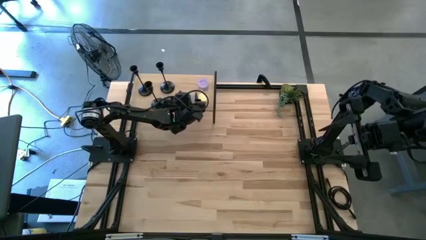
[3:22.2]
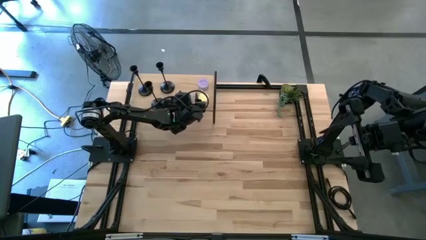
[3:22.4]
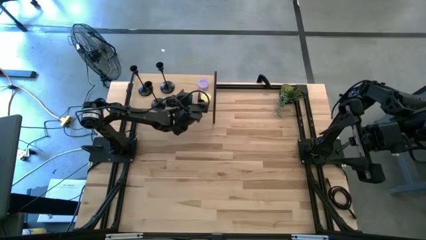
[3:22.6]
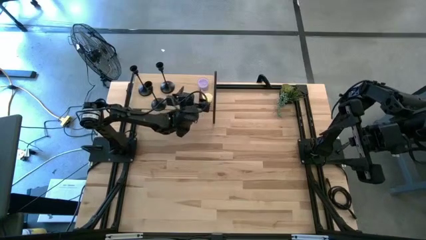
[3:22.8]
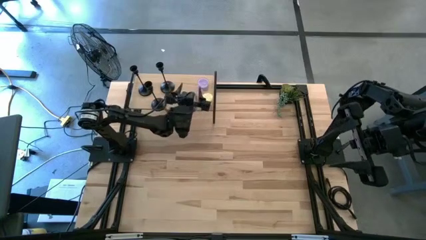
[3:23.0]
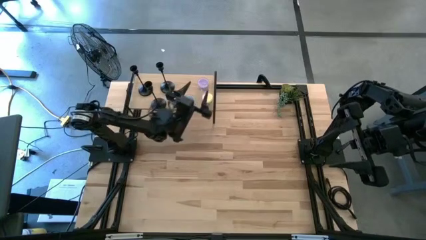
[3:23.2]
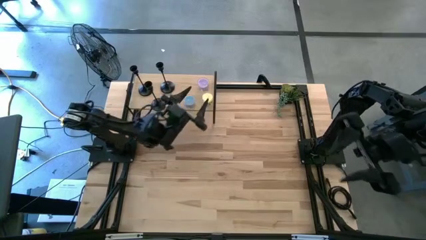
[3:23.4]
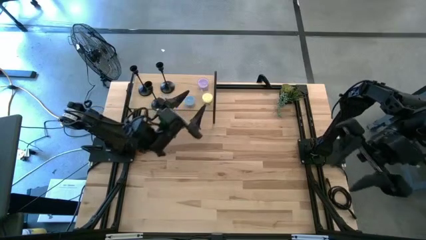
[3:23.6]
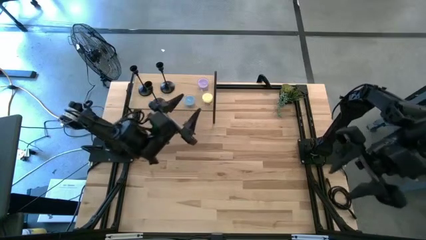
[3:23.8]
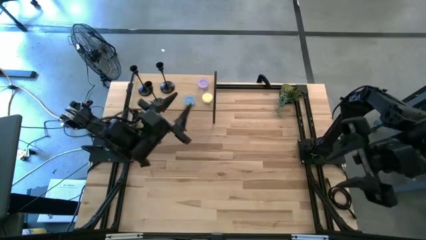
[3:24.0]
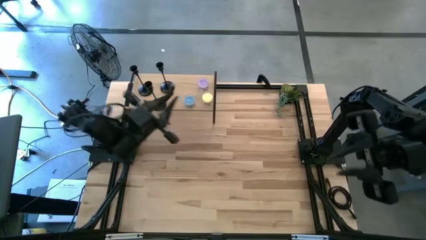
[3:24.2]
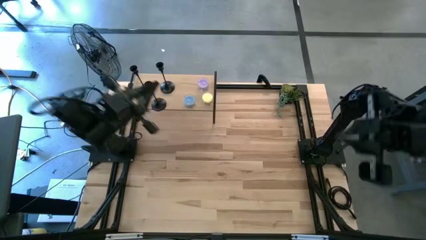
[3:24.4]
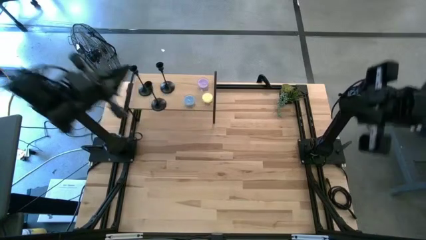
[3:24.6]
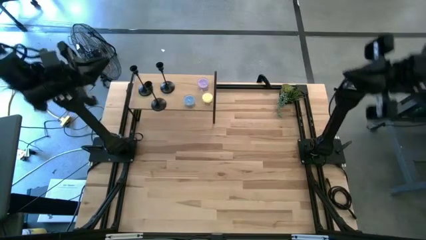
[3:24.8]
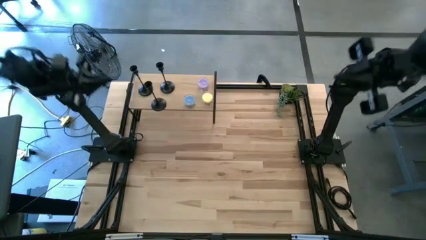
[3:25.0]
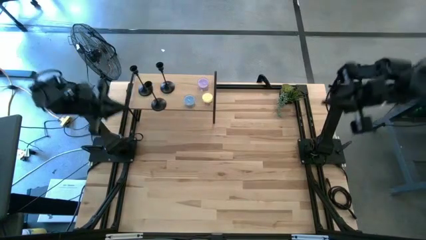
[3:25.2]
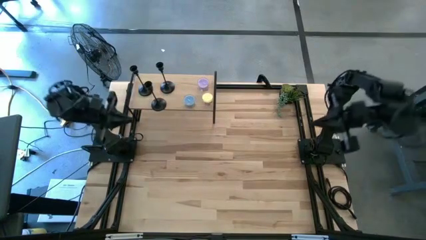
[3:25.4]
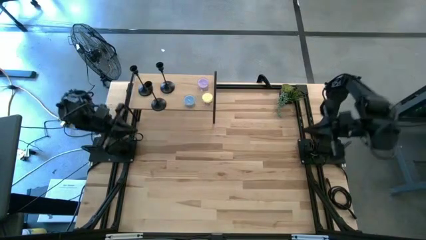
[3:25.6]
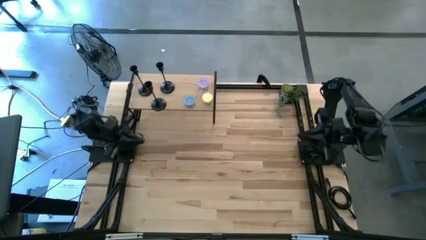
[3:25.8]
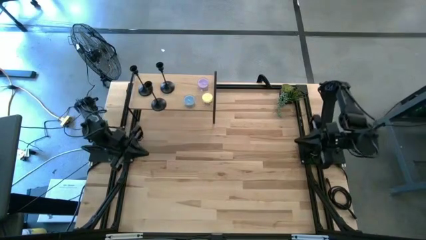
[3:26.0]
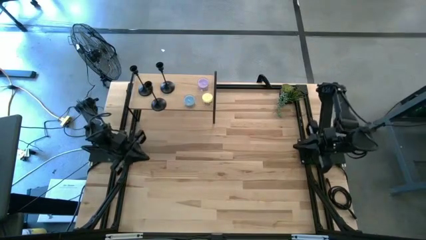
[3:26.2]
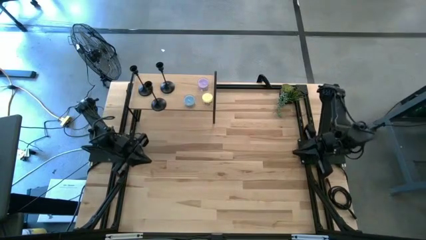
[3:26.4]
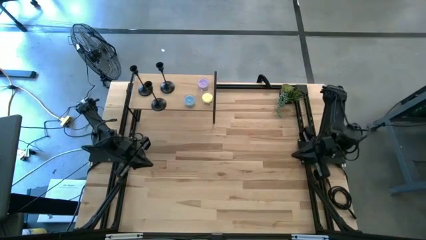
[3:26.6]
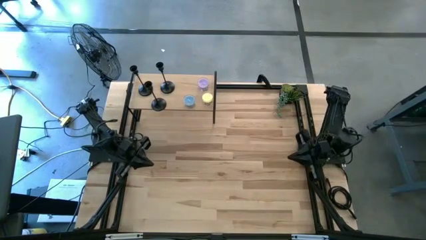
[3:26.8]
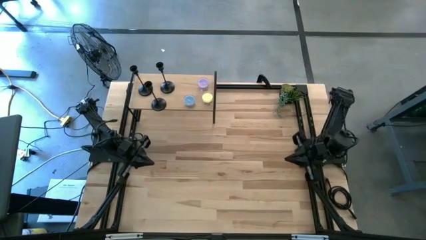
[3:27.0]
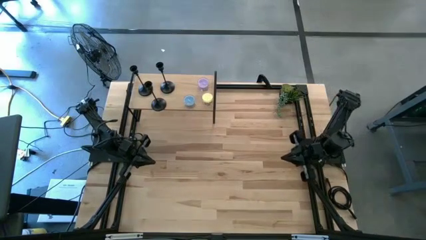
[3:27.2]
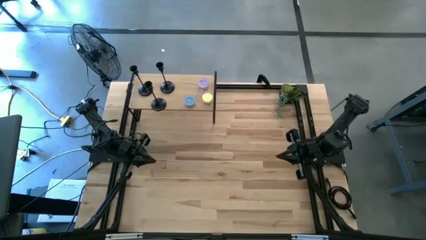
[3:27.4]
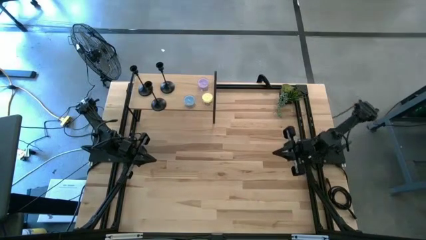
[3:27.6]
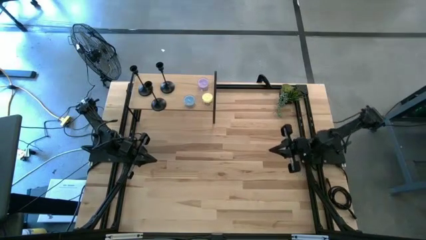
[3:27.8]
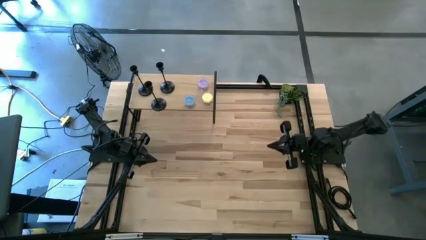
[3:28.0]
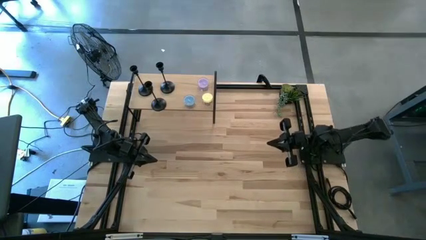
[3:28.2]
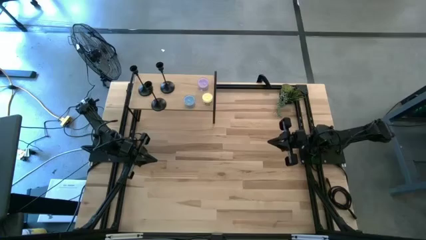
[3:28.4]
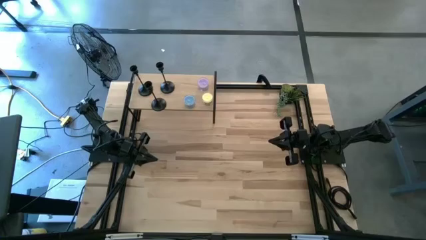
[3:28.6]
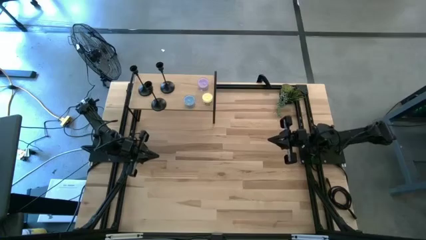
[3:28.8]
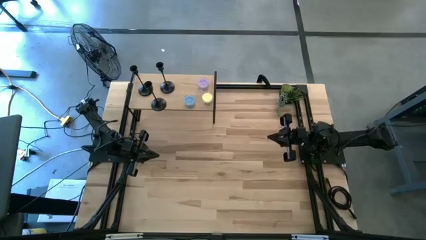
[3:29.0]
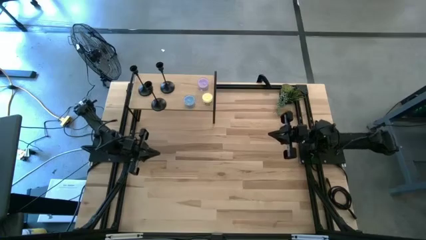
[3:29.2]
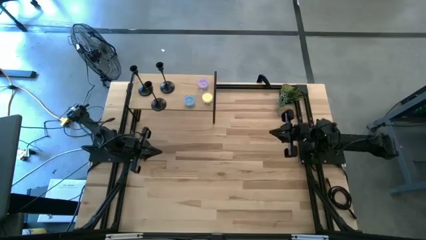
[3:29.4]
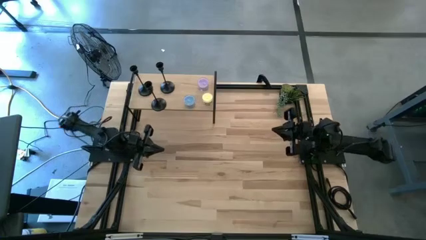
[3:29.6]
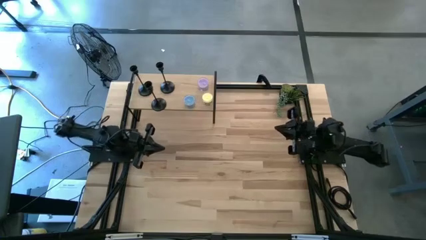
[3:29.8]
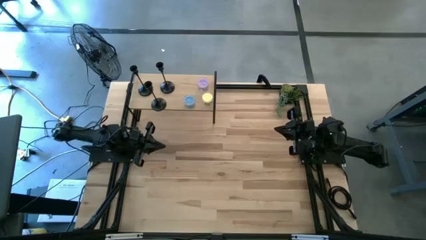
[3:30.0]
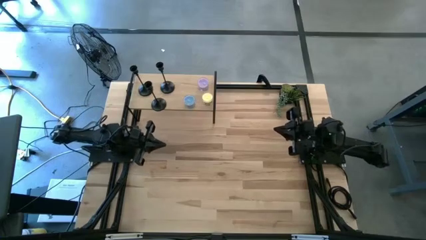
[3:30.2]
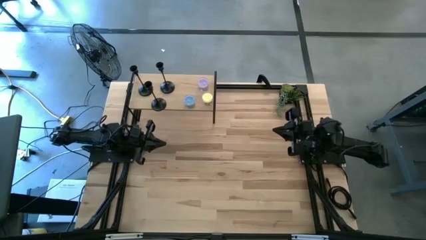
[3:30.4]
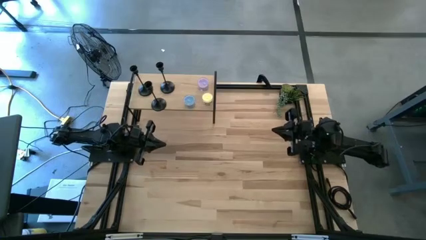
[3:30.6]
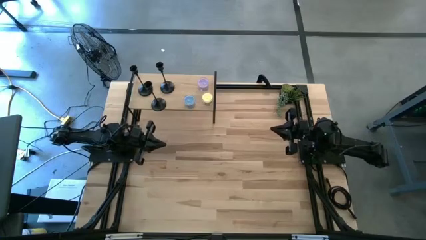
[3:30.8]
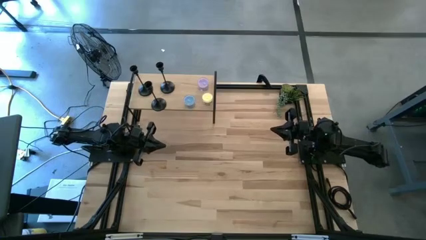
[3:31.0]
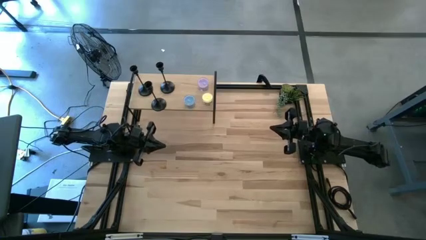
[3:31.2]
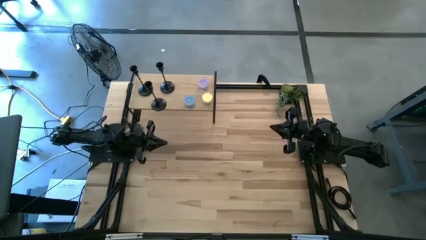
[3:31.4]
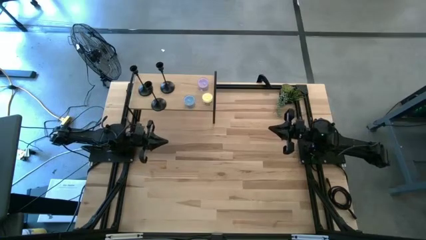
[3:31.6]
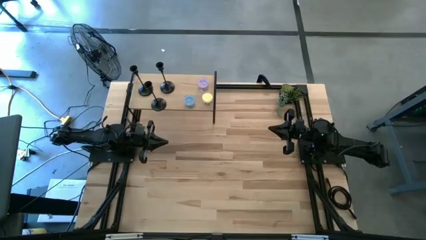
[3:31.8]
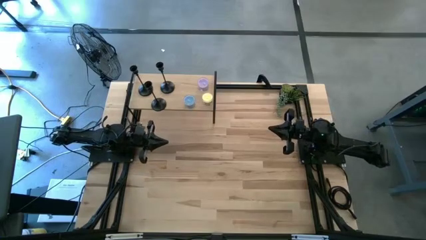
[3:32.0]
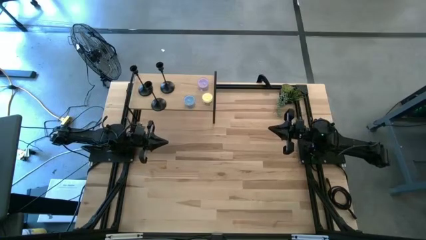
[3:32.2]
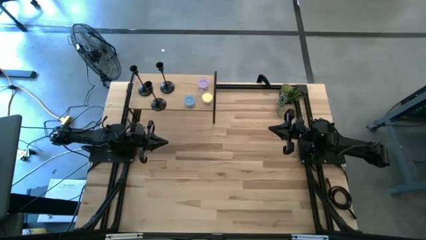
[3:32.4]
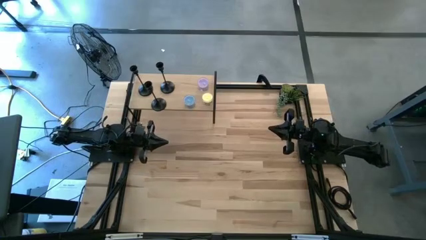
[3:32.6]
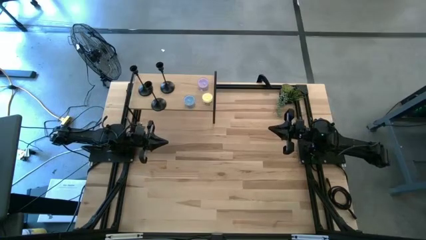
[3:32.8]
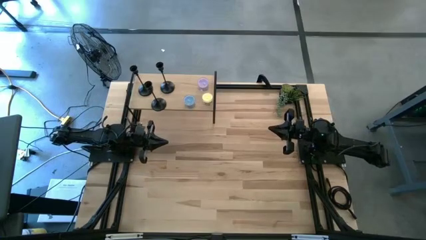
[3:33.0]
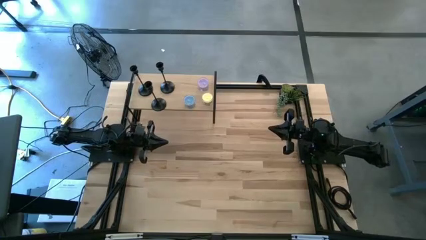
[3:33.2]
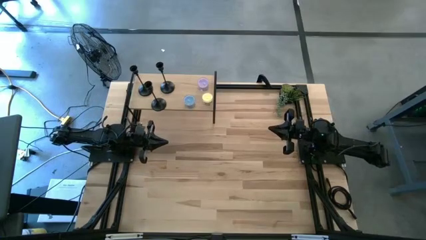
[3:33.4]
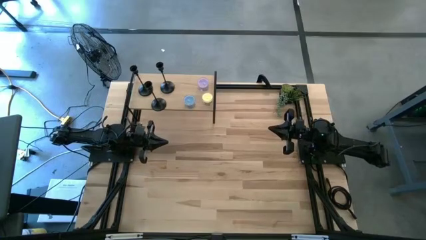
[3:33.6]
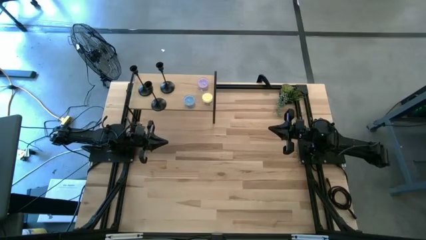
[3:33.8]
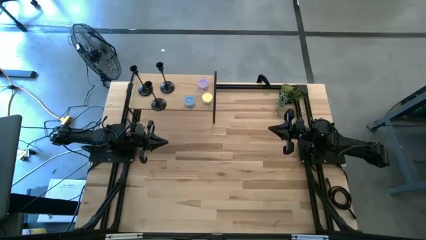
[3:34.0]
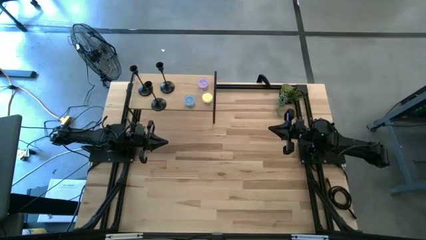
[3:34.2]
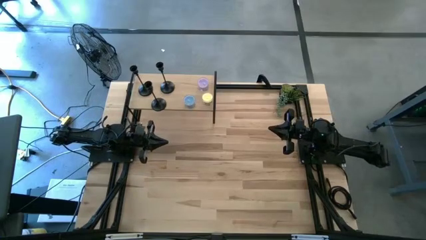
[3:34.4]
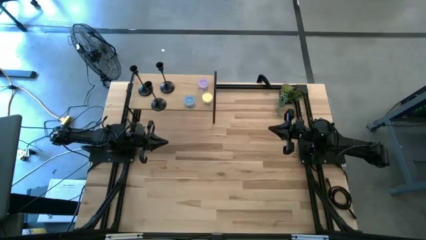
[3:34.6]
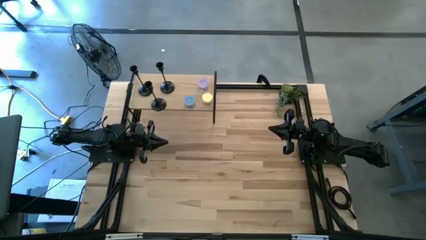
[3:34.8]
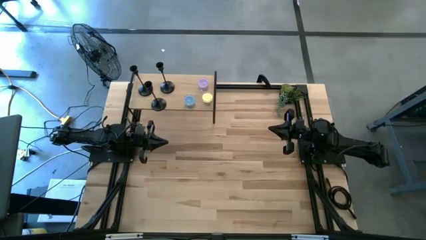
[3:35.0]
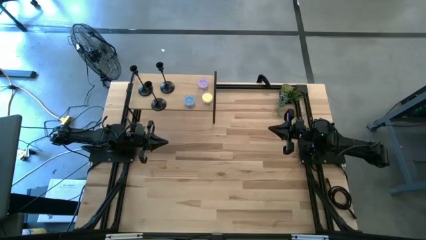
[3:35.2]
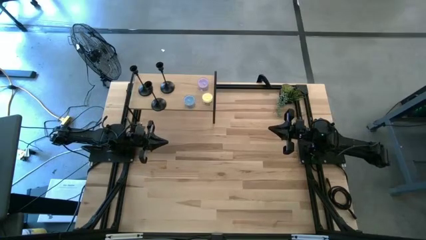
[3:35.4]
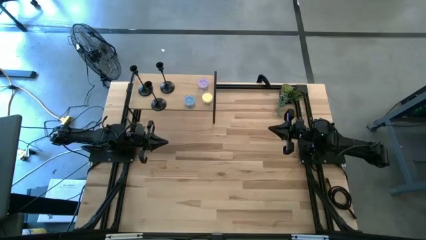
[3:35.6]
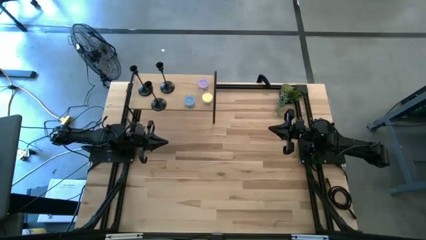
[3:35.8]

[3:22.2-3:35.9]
Task: Pick & Place candle stick holders
Return to Home Position

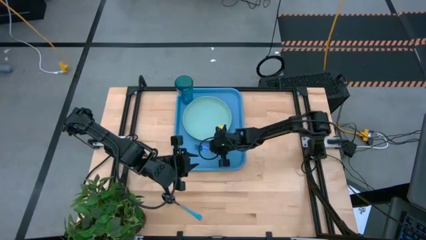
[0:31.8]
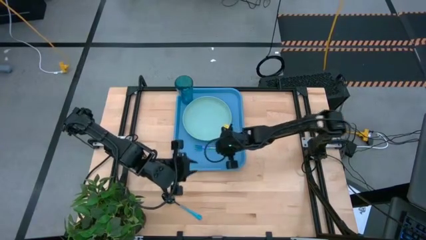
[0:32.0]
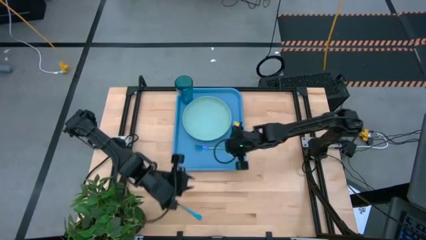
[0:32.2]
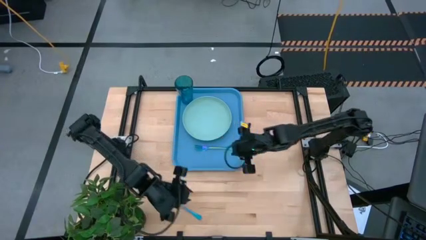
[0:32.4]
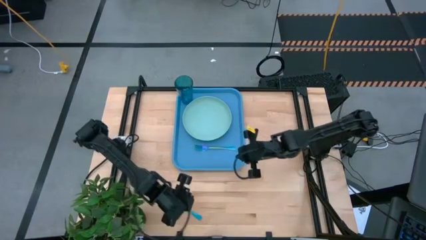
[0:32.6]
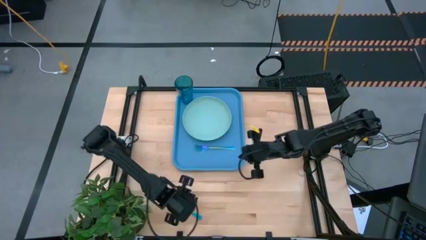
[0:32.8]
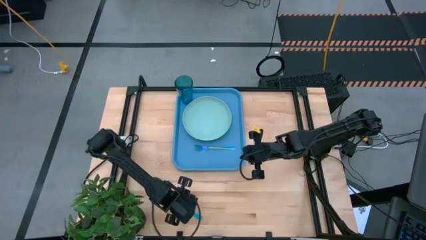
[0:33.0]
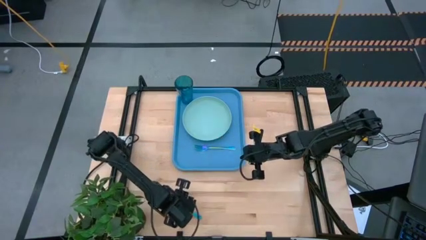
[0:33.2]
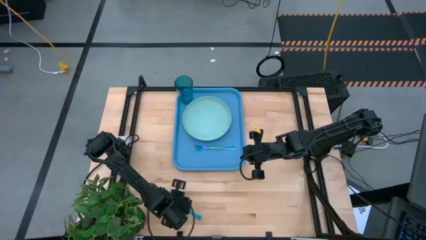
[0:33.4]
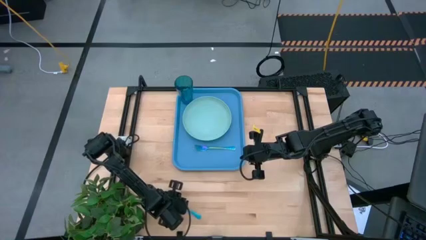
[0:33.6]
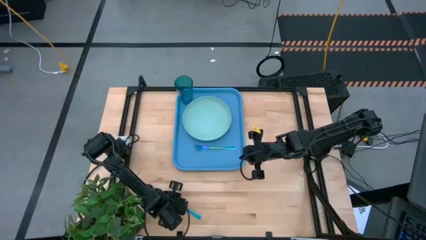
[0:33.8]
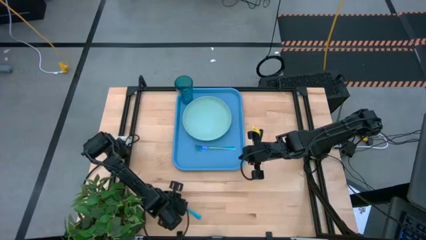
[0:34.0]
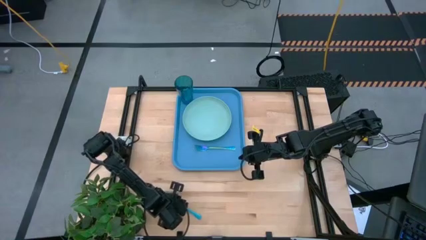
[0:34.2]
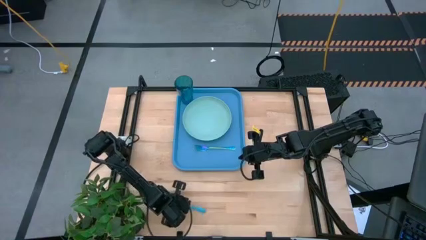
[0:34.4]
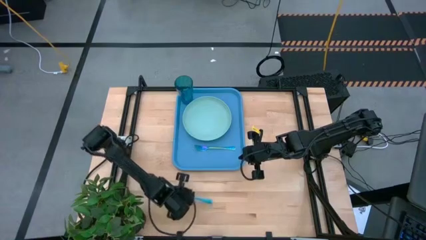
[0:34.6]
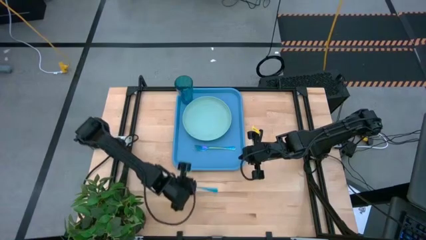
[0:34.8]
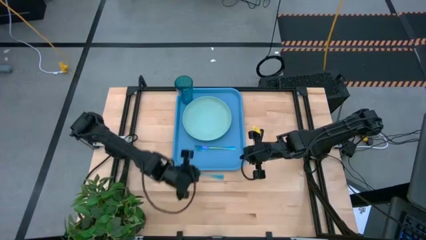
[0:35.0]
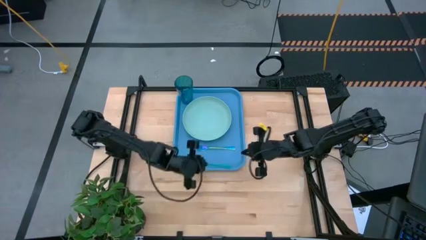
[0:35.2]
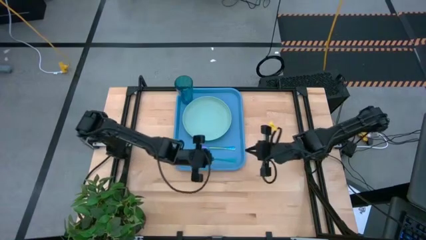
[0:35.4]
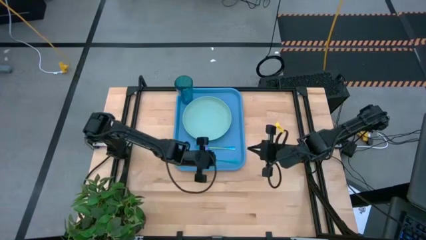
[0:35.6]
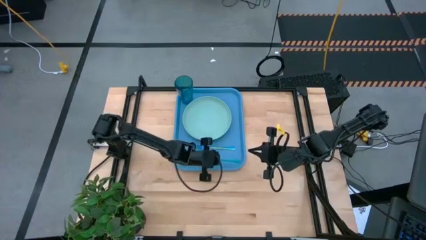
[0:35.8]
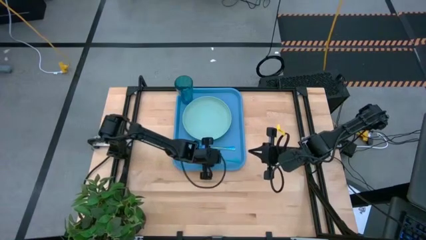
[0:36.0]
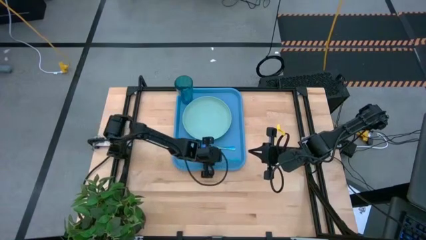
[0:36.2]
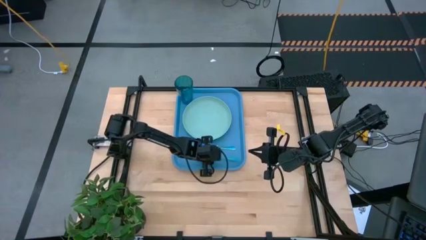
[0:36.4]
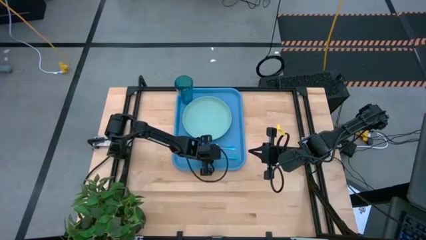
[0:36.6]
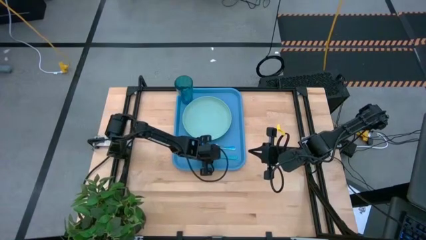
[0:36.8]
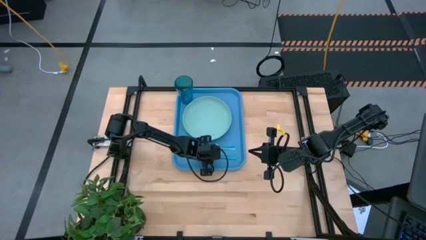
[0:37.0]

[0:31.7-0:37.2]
Task: Pick and place plate/cup/fork/spoon on tray
Put the blue spoon on the blue serving tray to the left of the violet fork
